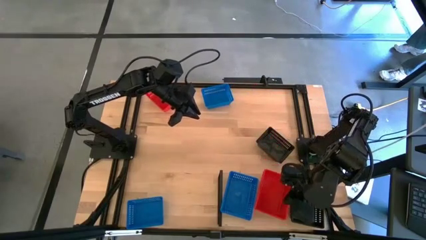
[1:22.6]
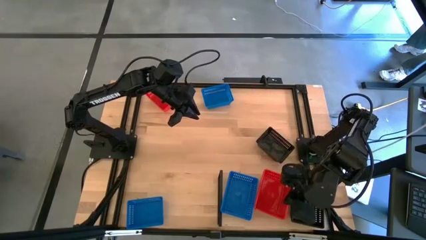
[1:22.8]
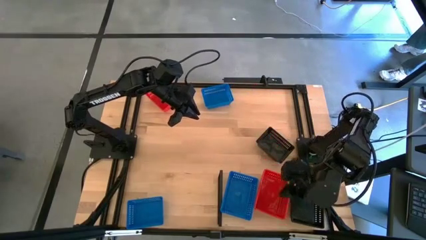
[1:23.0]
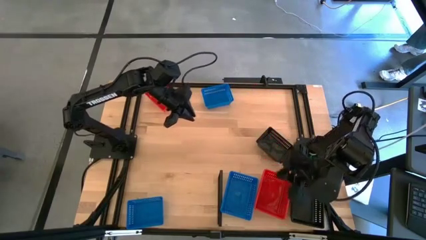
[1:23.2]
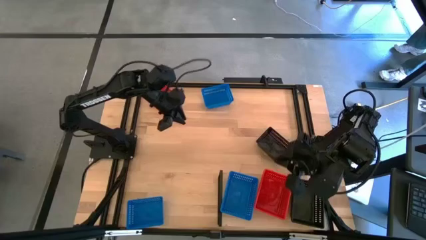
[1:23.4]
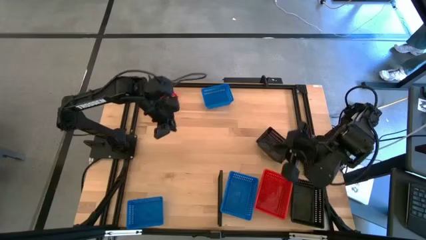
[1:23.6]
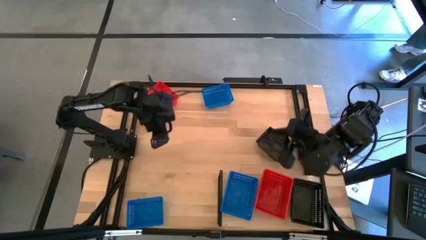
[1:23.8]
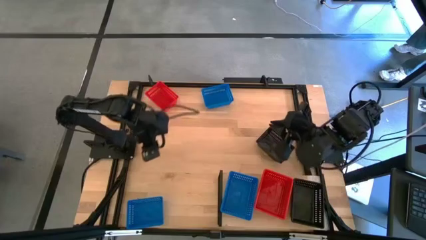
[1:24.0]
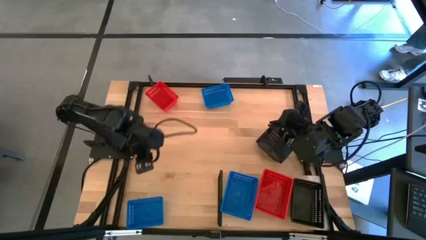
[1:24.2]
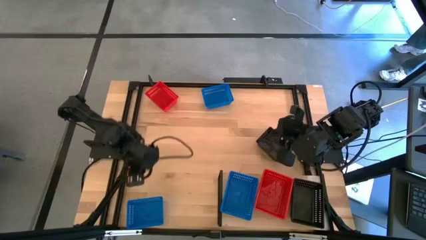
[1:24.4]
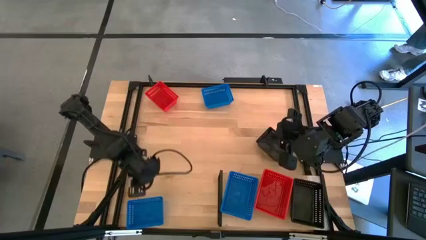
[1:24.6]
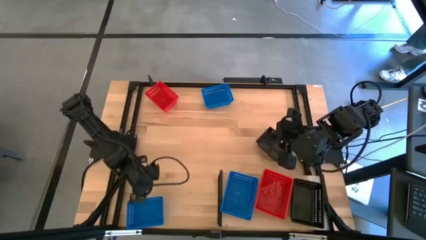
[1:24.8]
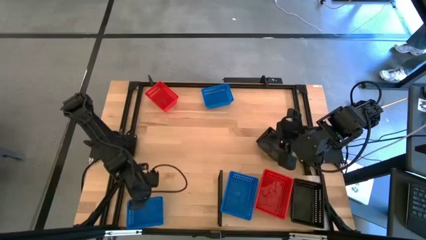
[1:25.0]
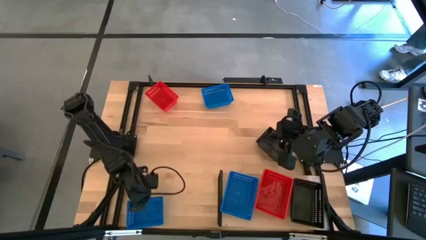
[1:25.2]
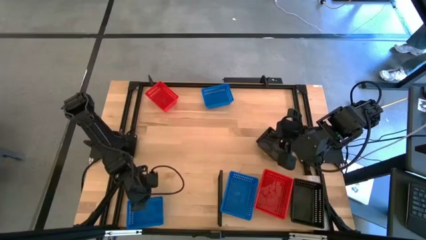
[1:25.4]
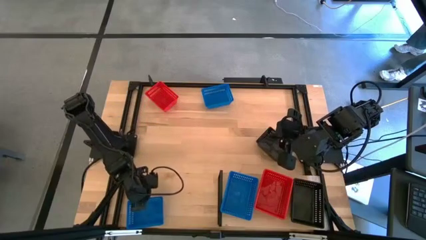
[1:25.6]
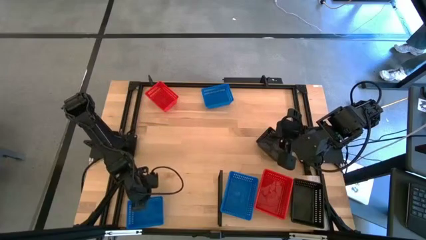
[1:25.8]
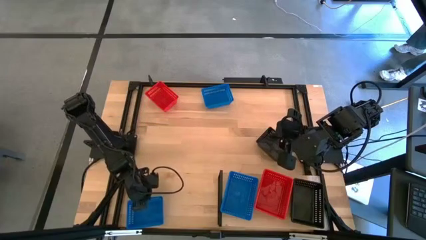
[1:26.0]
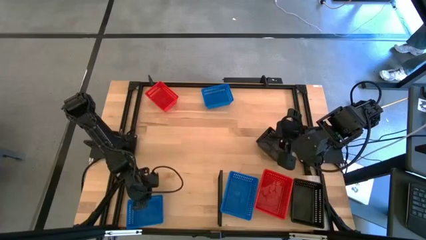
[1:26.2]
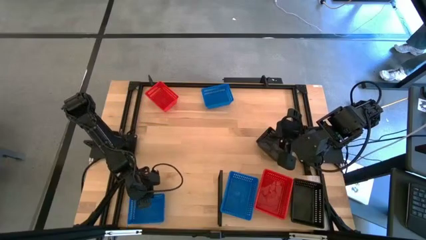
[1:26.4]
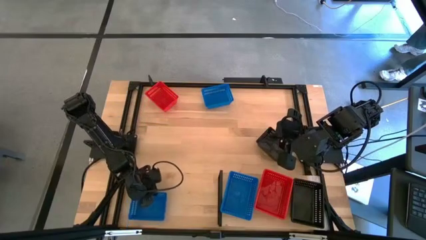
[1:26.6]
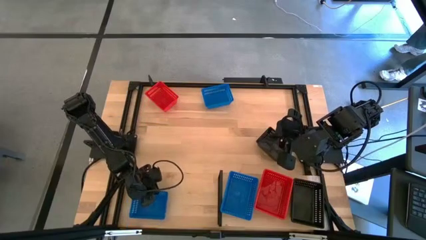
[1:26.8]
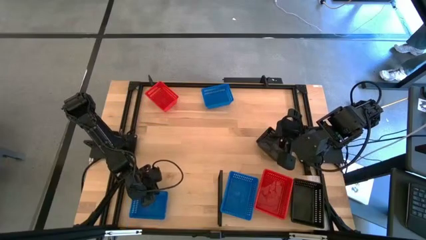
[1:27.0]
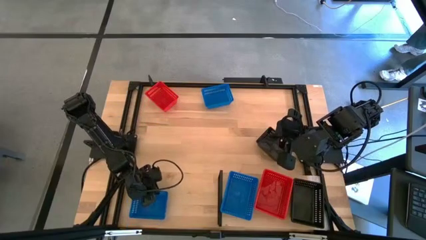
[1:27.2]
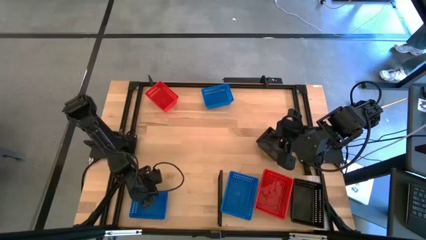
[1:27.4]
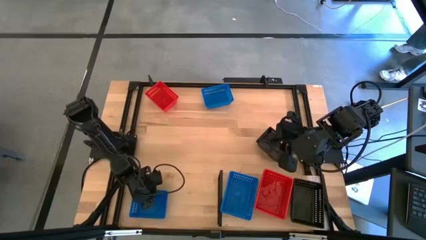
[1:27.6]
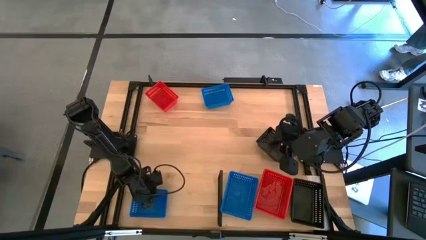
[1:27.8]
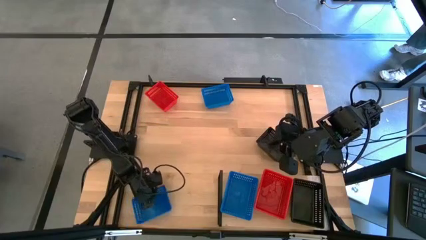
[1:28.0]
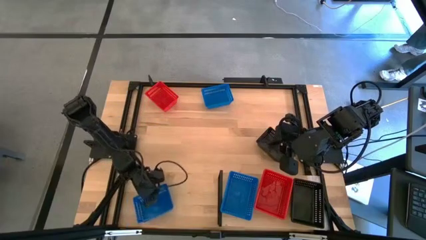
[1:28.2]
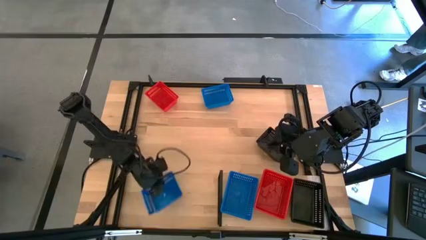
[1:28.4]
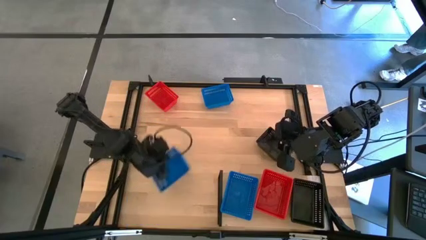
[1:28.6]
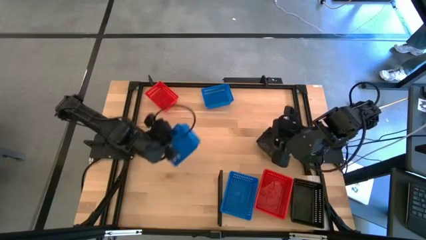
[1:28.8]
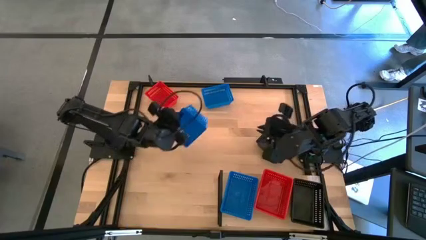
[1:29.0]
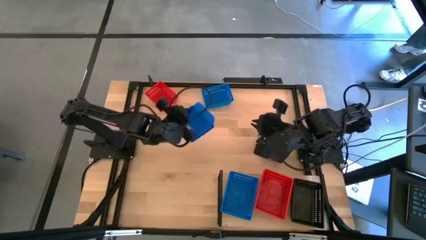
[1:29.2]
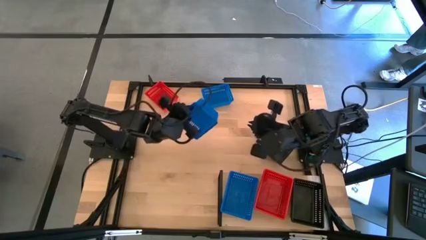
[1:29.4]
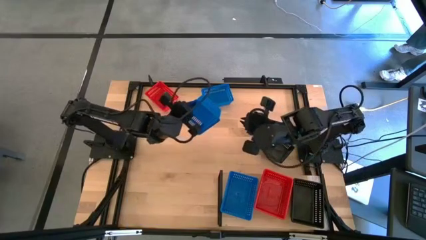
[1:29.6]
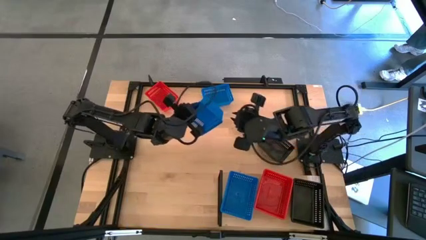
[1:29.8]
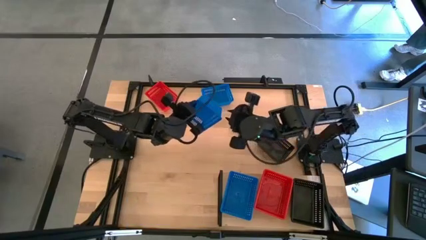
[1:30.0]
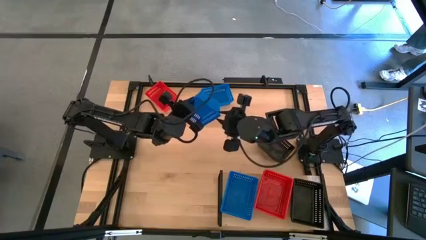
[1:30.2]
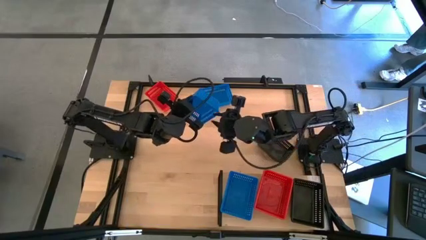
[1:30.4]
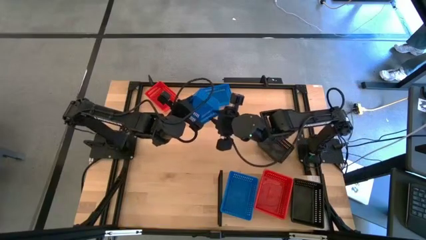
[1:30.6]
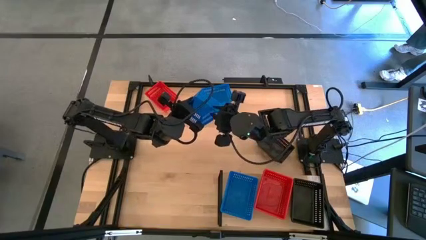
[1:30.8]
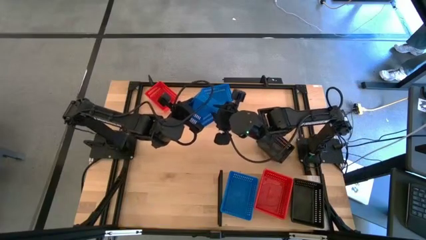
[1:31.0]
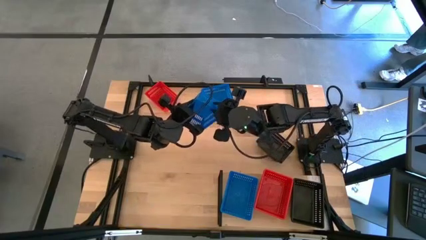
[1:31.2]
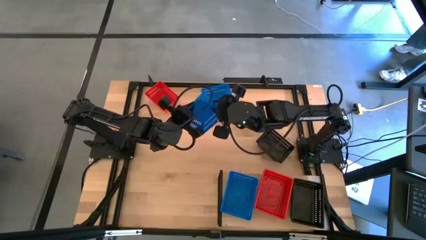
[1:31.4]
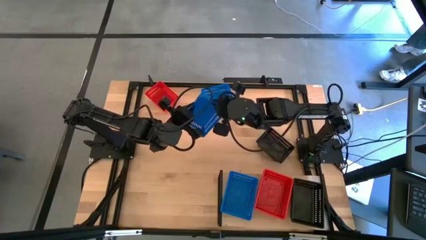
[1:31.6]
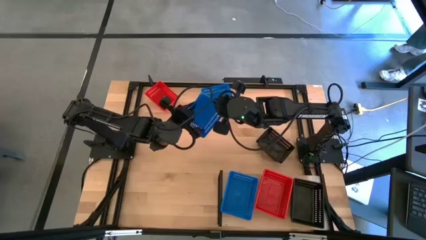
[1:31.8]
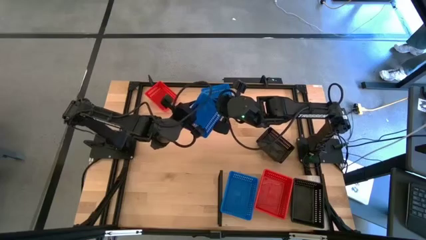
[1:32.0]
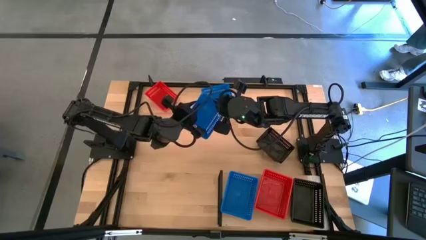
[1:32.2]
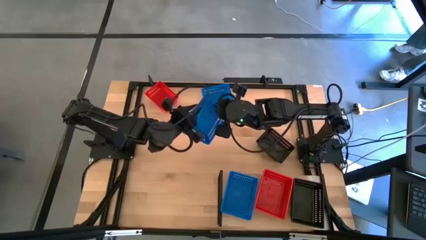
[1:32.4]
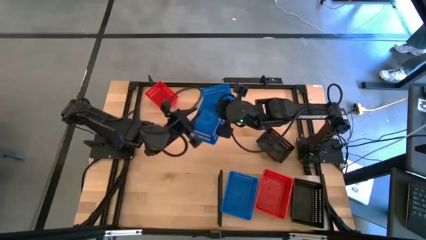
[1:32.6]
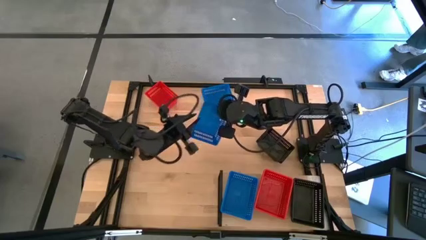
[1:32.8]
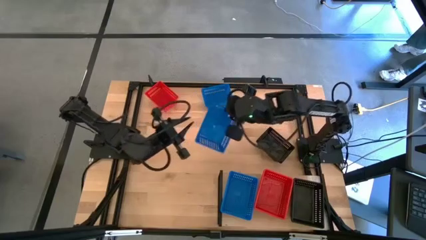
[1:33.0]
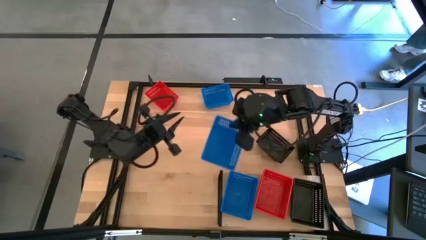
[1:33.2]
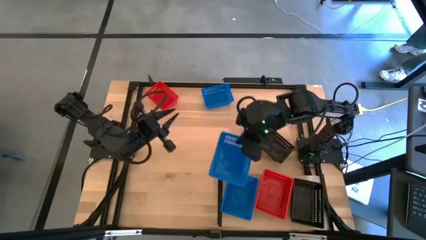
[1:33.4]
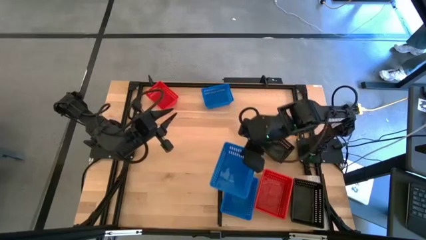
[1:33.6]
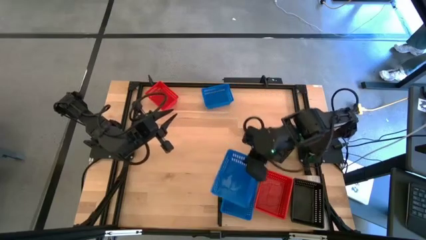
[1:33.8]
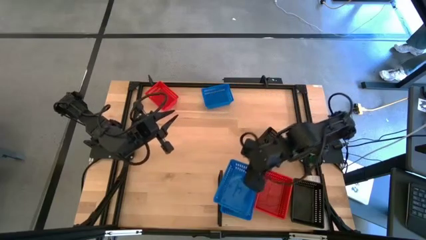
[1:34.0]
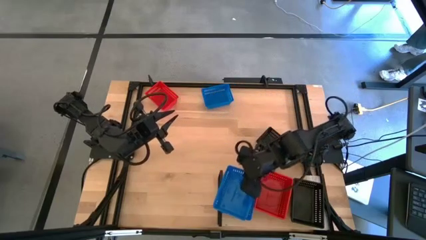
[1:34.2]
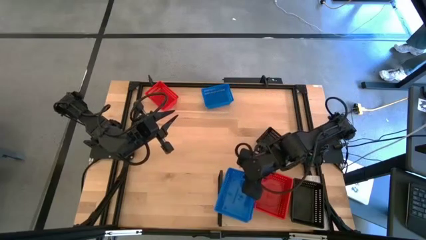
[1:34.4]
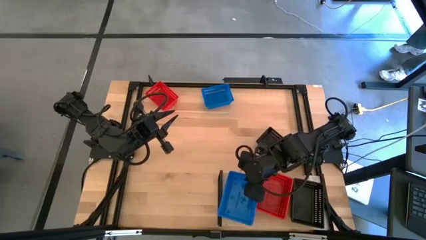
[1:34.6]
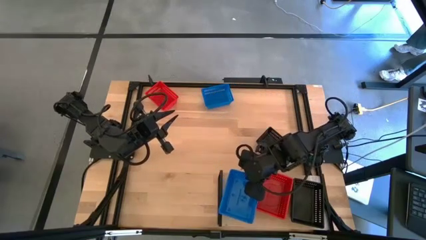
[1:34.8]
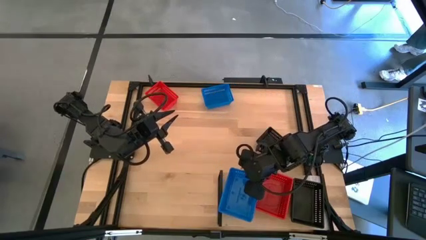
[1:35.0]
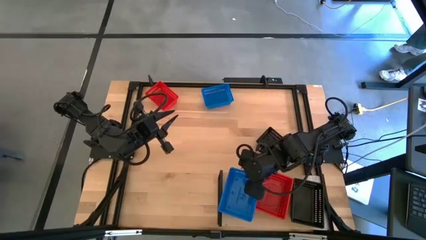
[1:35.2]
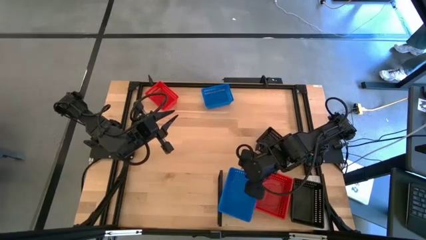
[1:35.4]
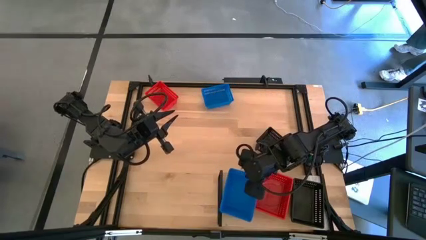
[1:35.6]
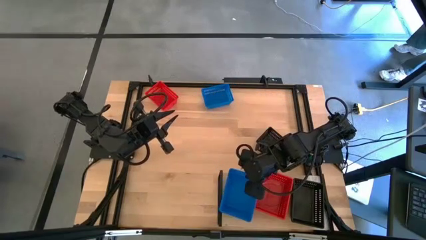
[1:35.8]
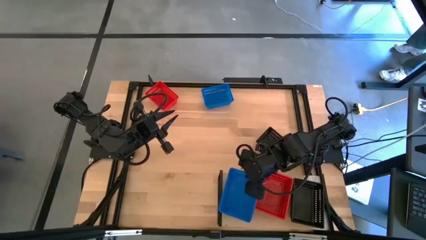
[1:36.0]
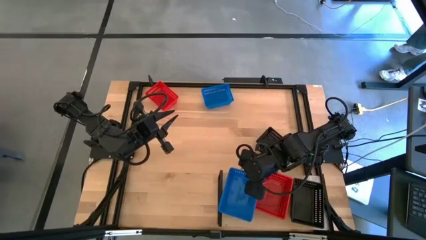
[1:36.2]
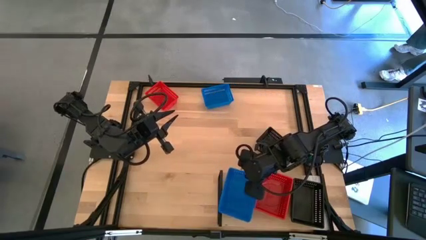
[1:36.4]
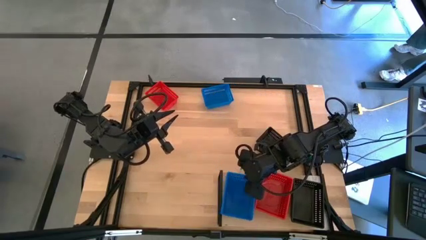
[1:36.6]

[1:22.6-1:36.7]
Task: Stack baskets on shelf by color
Stack the bottom blue bin on top of the blue bin on the shelf

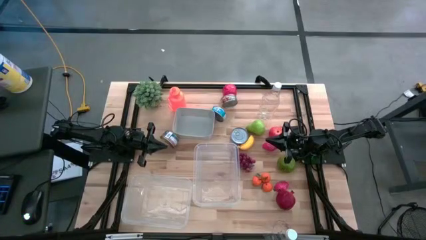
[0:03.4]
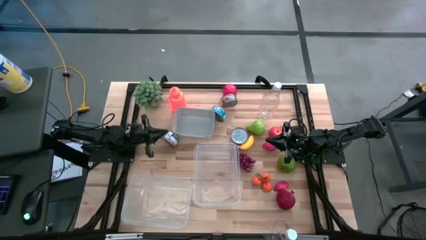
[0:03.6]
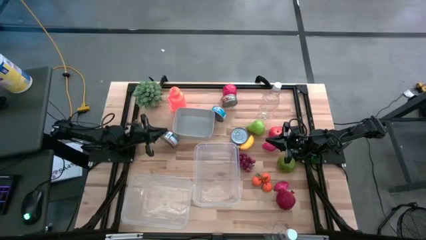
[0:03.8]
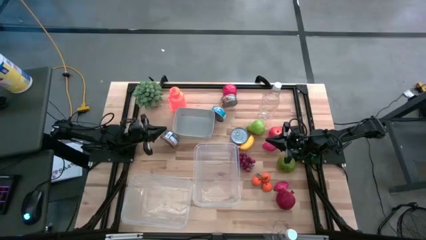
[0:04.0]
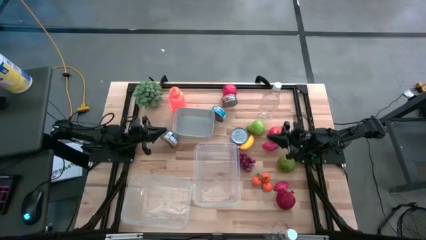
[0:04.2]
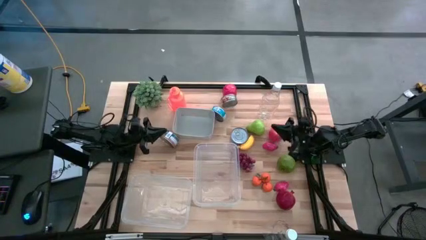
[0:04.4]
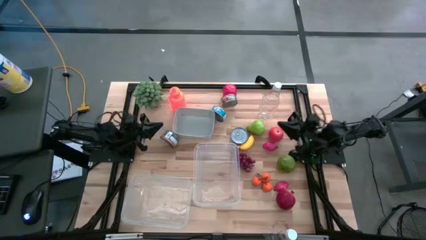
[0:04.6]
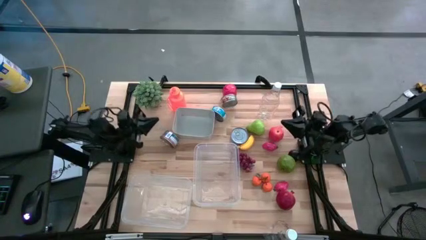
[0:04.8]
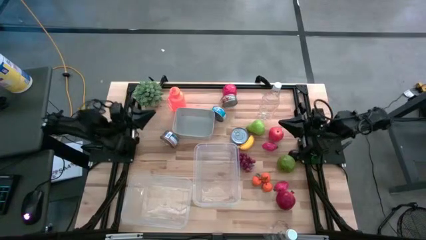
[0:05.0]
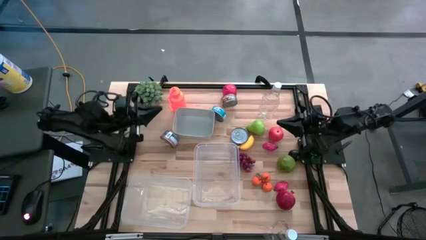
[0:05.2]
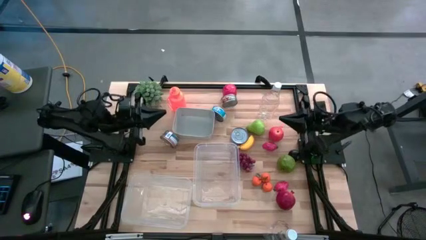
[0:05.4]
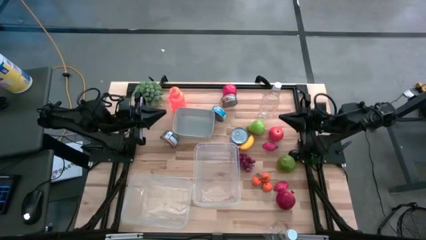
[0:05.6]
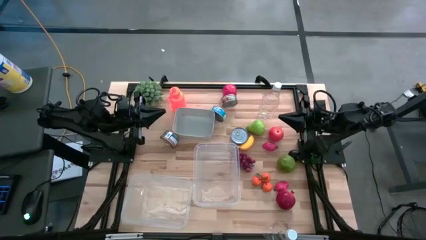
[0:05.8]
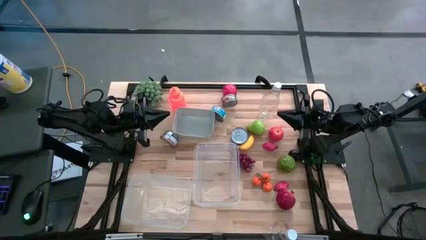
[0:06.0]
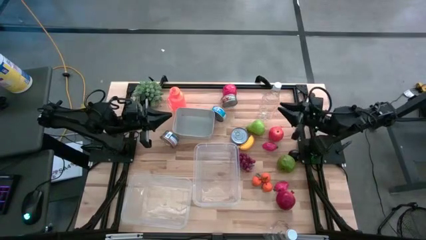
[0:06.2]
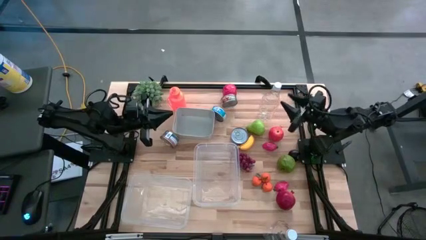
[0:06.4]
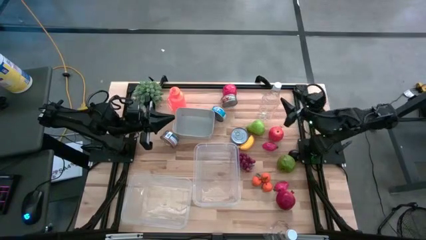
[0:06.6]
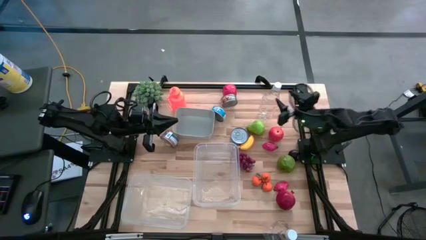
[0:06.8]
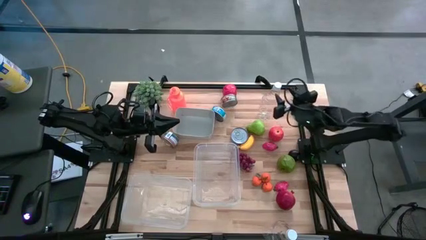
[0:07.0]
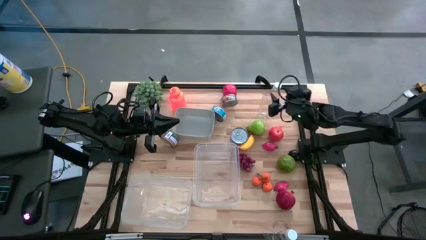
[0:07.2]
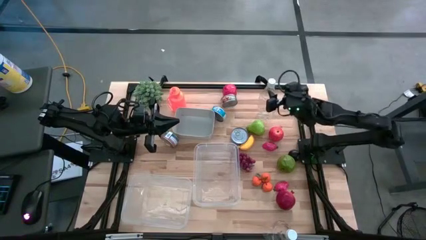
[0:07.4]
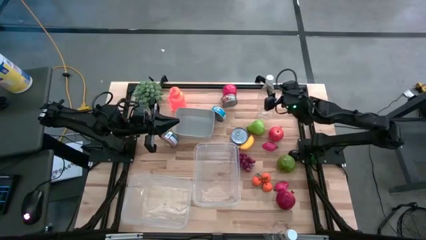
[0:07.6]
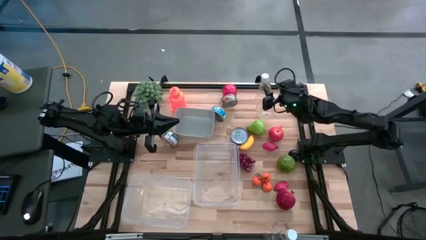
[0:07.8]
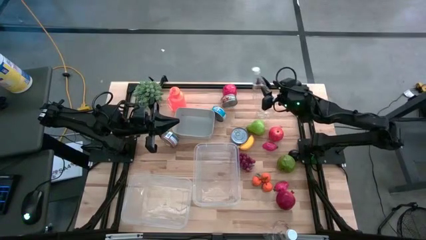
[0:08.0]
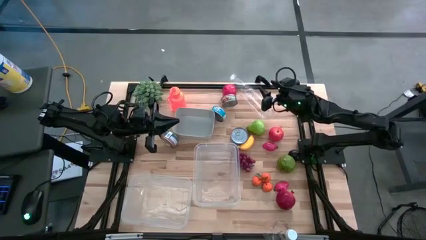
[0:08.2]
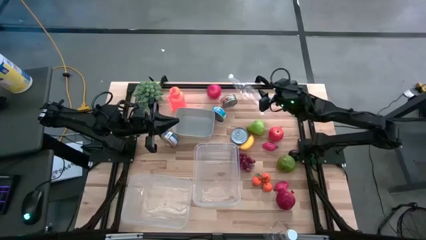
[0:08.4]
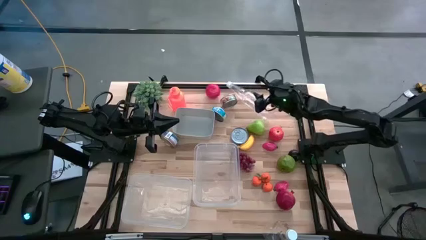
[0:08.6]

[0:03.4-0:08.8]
Task: Pick & Place Food Item
Put the top transparent plastic bottle into the left transparent bin
